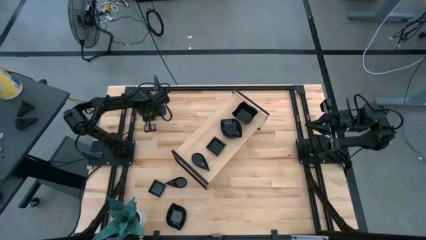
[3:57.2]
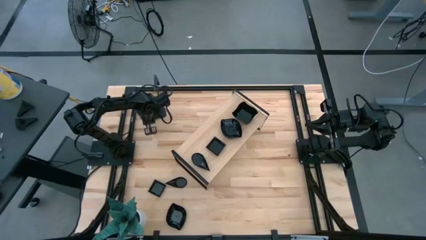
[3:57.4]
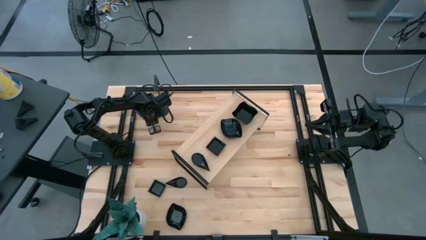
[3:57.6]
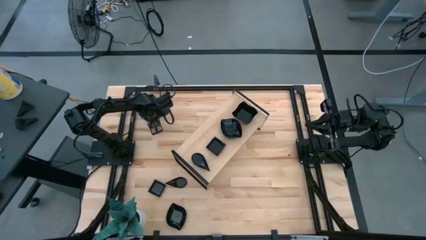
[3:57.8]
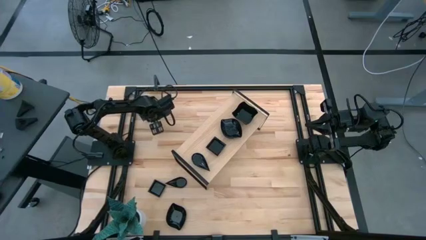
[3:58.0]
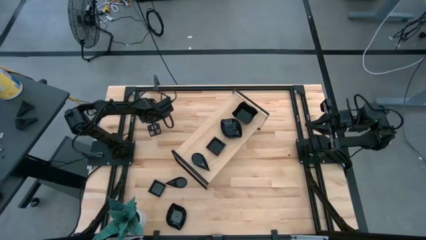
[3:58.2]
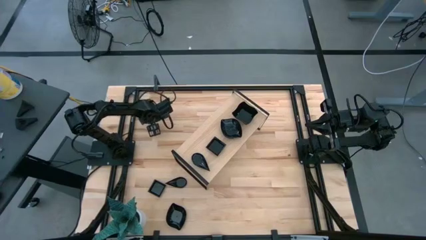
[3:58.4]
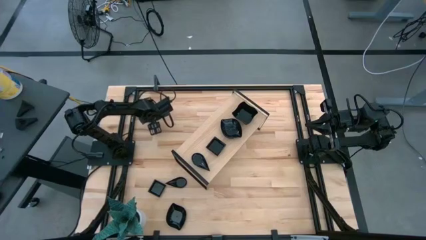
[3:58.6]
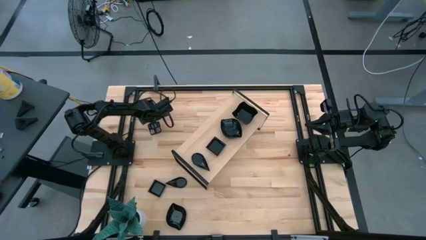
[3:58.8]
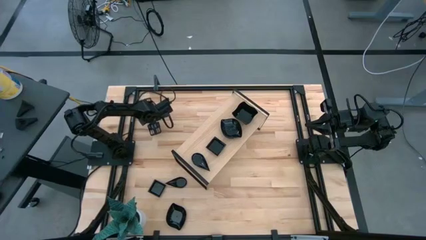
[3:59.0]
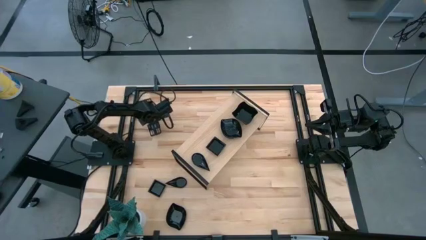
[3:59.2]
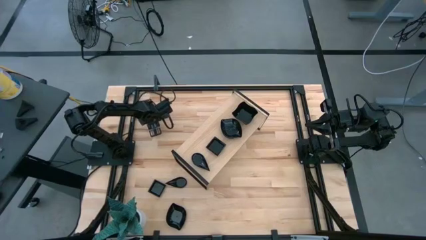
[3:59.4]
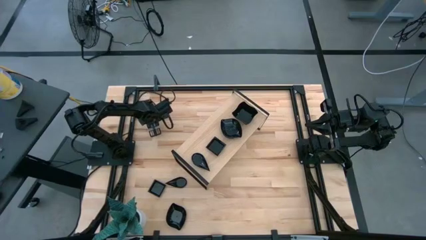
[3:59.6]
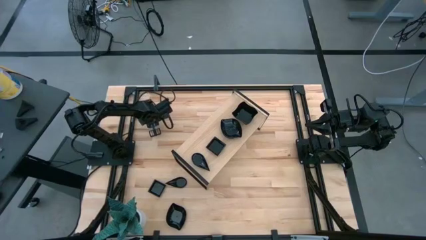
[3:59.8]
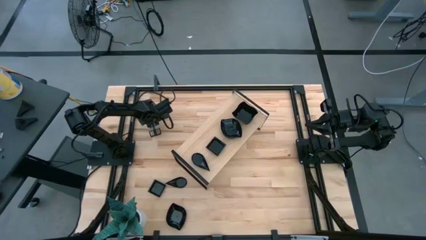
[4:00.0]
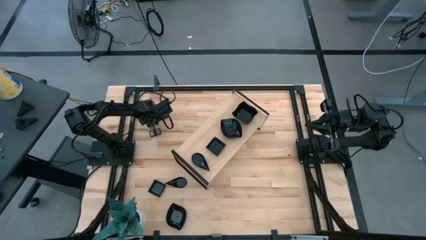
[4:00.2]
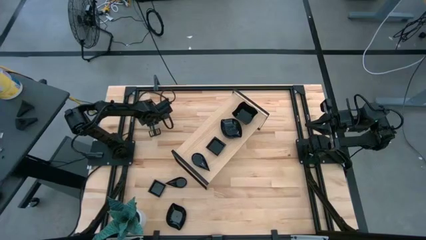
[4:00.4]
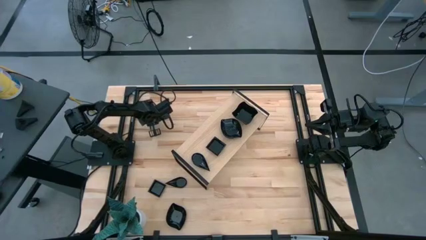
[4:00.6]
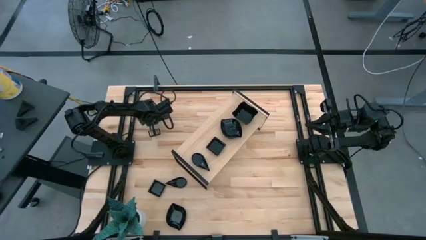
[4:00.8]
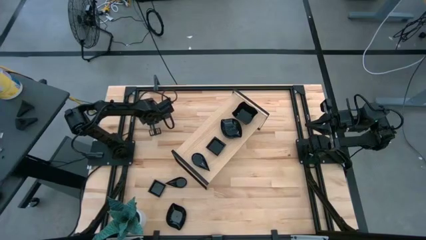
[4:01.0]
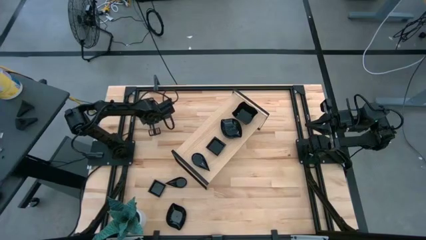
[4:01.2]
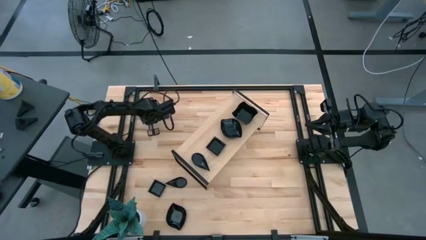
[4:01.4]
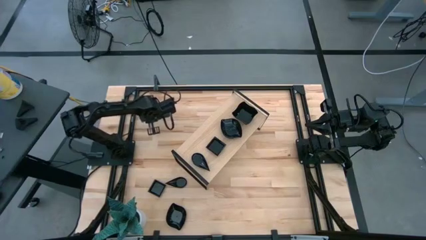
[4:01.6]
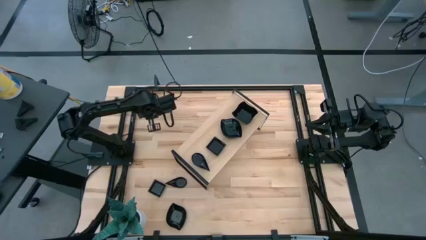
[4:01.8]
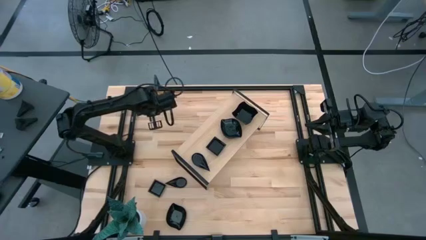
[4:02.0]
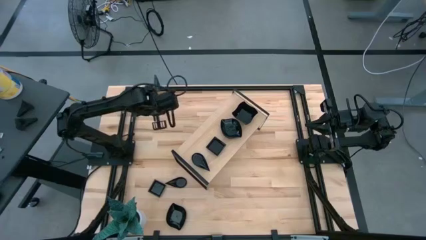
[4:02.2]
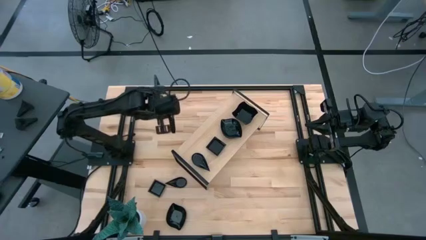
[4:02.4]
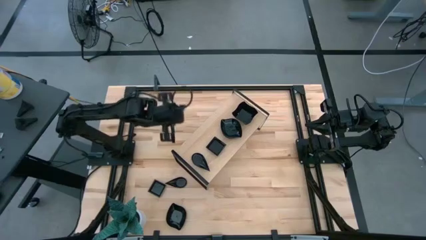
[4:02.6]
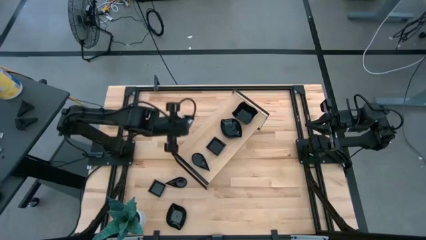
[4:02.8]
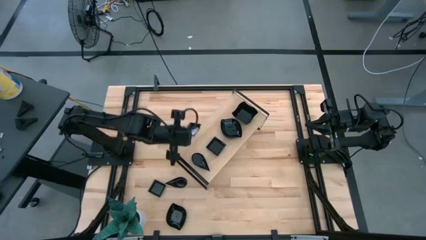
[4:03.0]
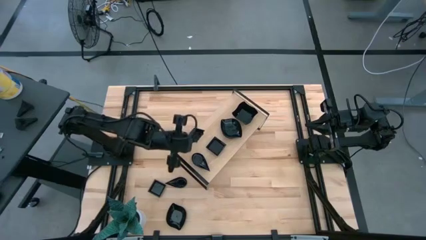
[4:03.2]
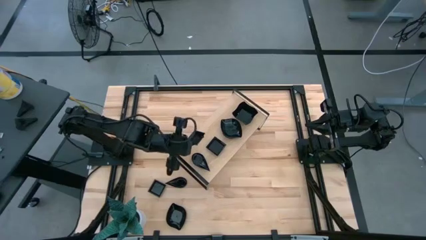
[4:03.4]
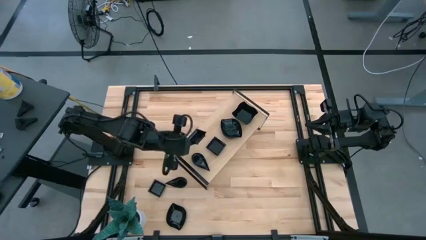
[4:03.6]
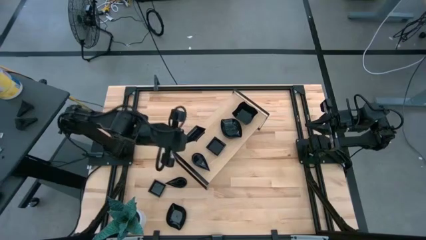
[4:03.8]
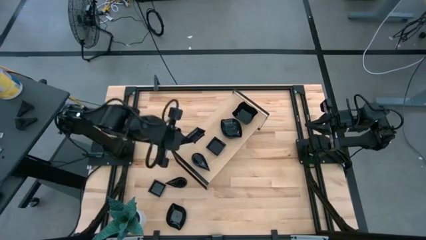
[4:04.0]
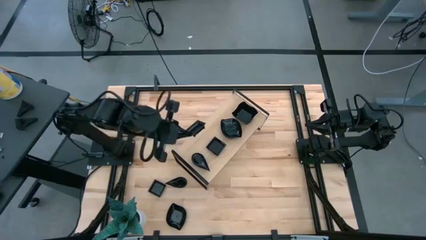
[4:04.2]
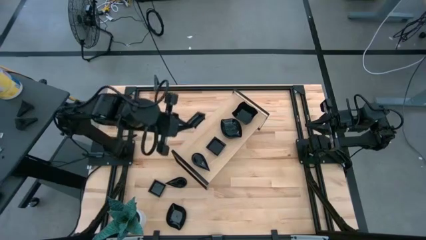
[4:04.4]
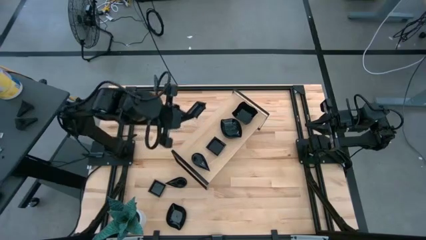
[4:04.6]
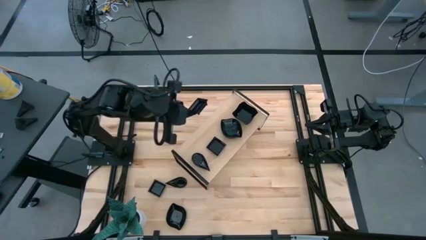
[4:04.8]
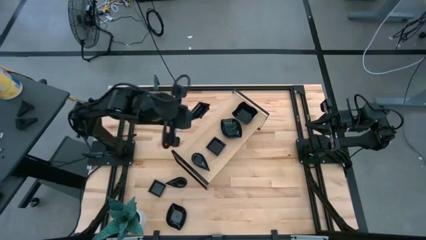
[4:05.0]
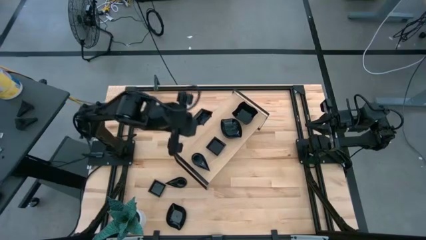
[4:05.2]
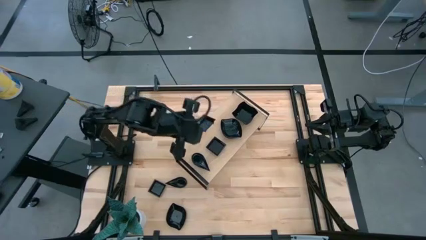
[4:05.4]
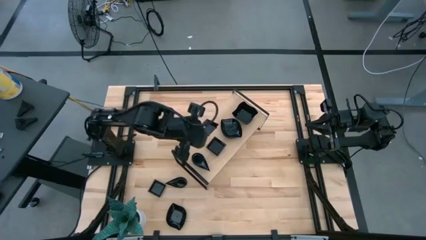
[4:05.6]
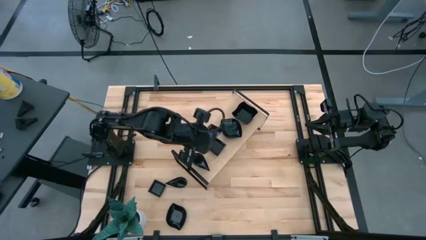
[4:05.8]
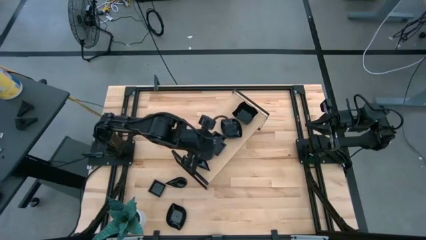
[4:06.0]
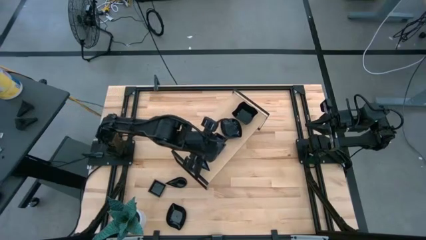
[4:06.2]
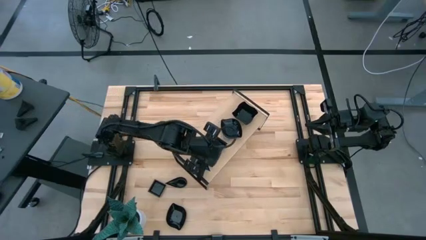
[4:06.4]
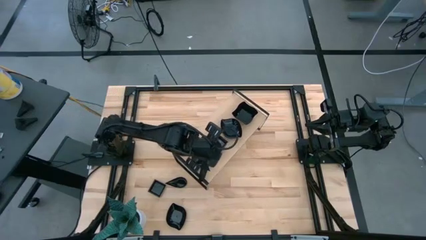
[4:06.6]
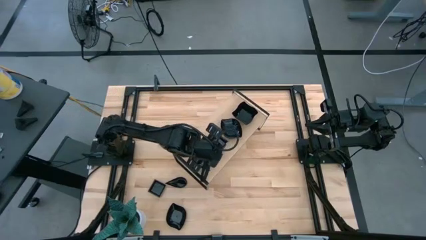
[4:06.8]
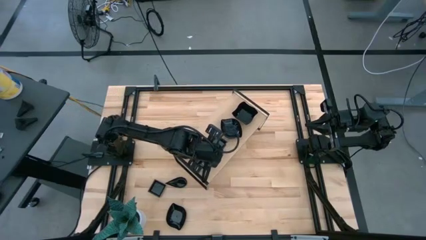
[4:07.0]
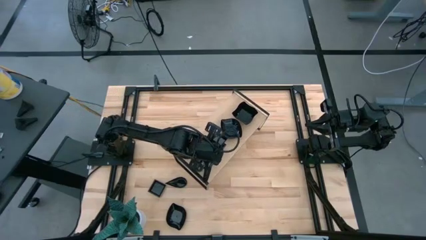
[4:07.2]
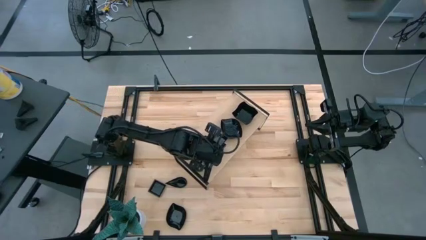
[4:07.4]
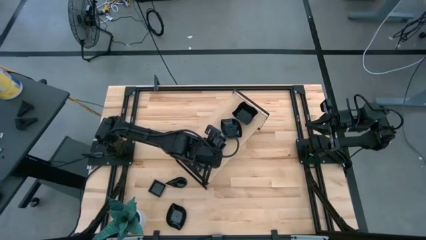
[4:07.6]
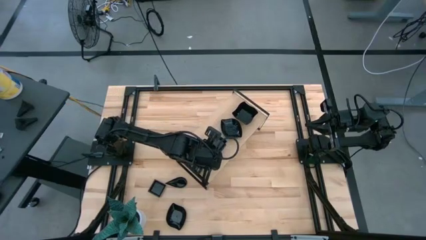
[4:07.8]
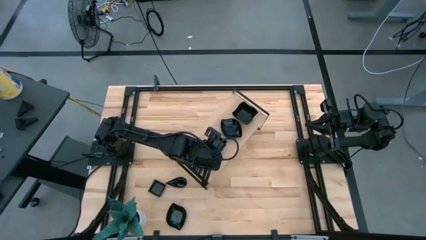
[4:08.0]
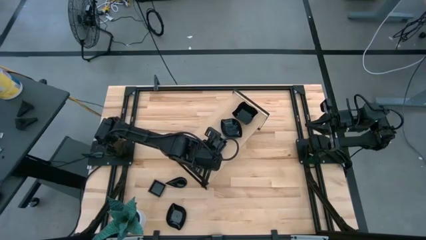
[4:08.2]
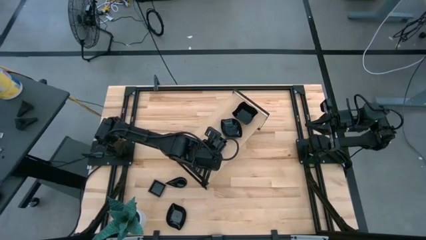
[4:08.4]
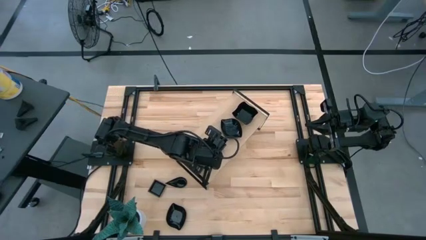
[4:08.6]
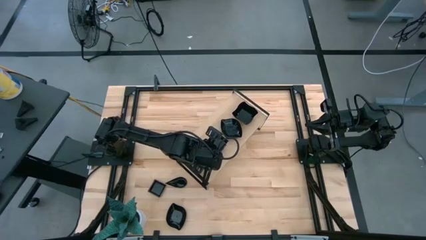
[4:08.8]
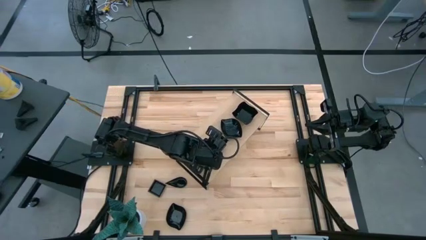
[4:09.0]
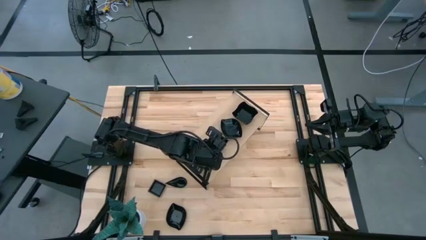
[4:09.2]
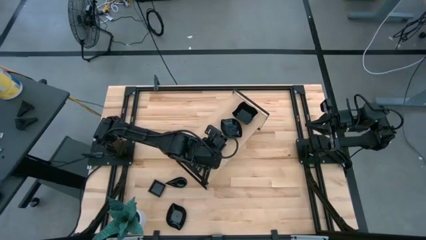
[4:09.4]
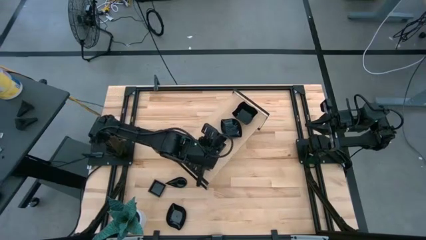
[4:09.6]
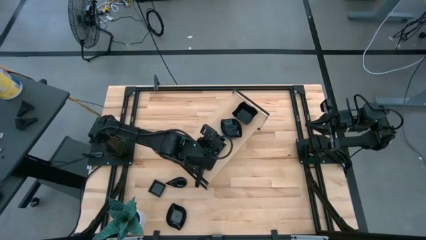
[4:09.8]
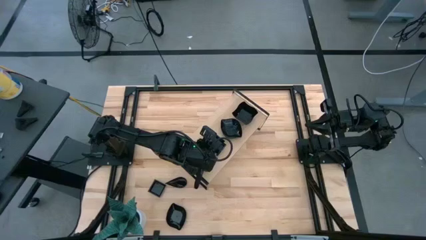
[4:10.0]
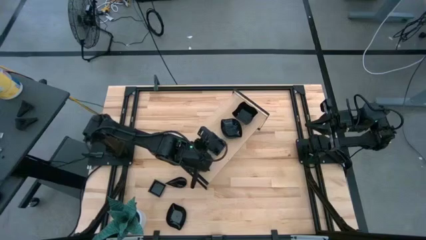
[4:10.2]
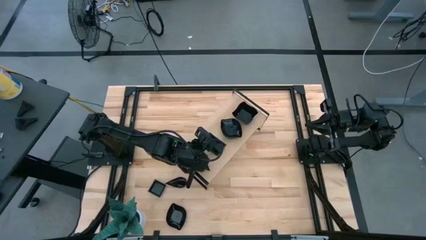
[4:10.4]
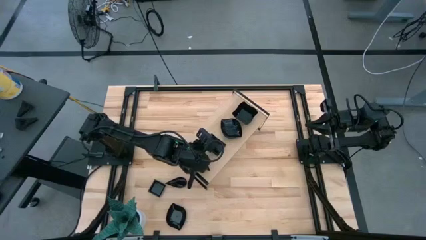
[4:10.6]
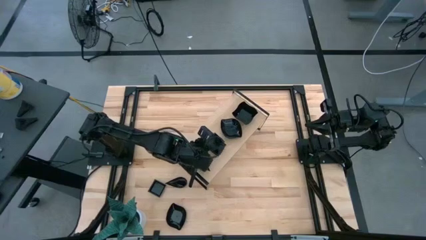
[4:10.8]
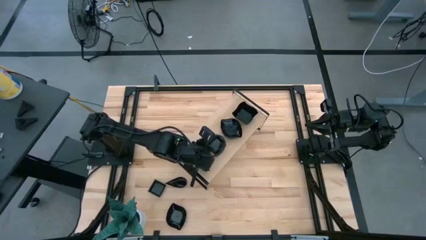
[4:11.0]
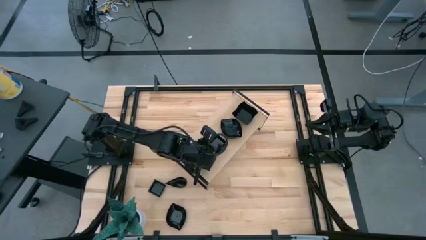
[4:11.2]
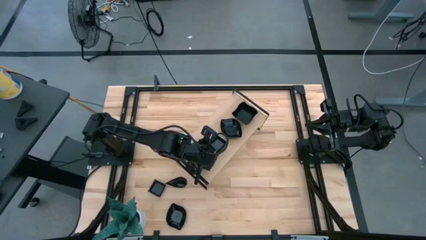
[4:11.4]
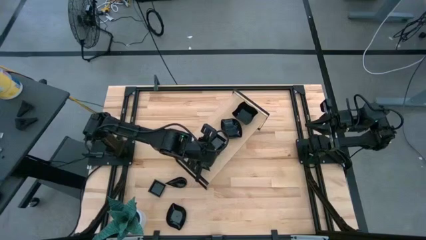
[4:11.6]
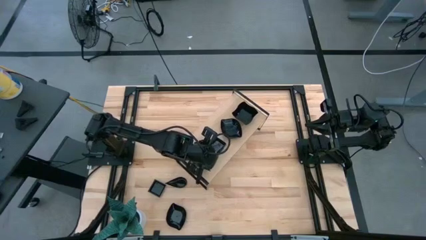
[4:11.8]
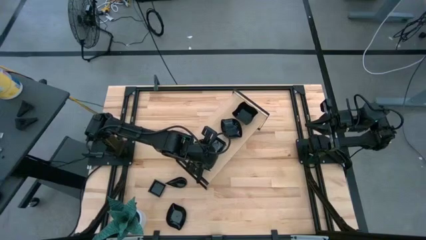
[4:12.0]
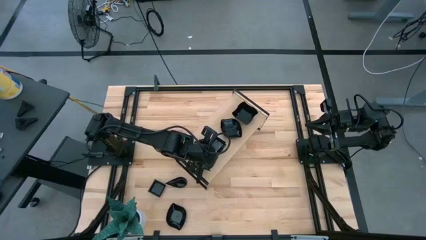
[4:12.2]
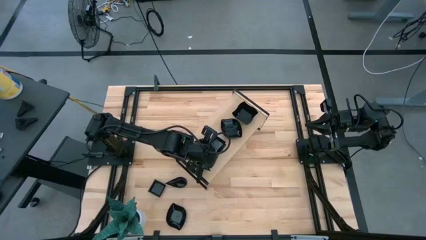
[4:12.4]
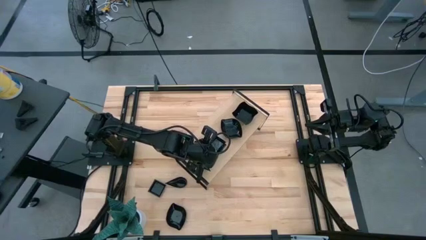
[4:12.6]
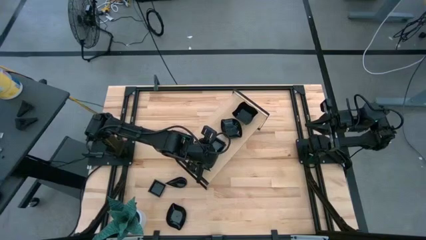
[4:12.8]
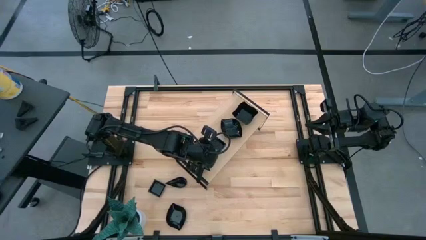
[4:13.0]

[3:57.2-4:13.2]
Task: Pick & Place Mini shaped plates
Stack the black square shaped plate on top of the black square shaped plate on the shelf
